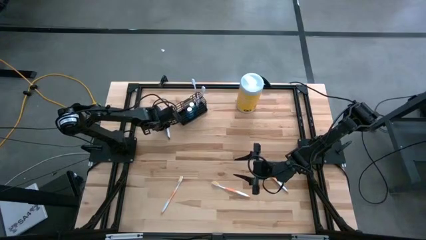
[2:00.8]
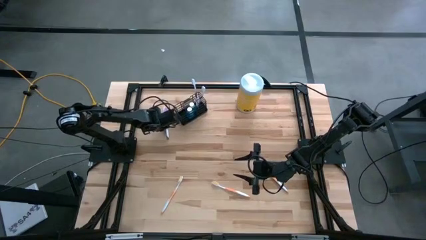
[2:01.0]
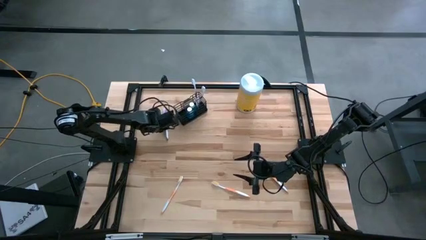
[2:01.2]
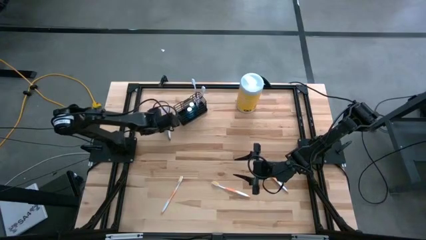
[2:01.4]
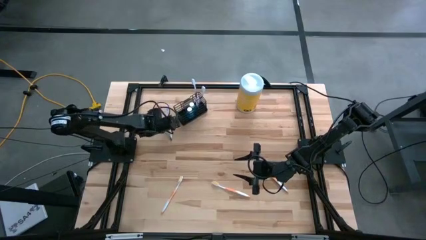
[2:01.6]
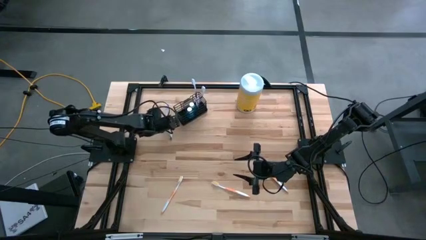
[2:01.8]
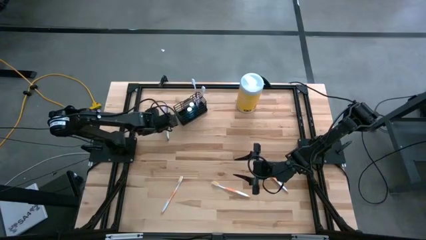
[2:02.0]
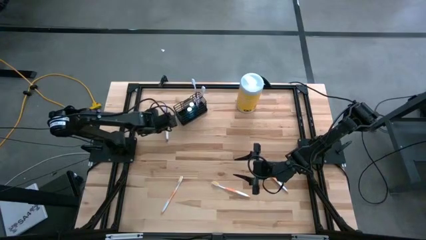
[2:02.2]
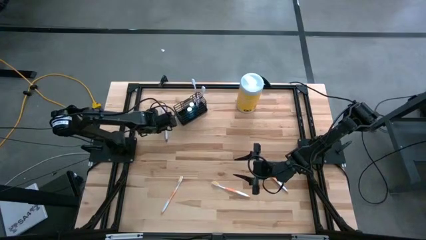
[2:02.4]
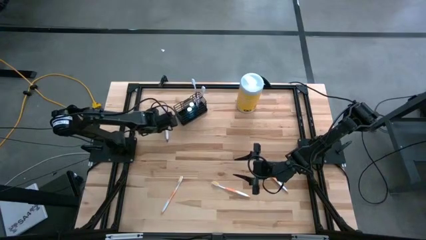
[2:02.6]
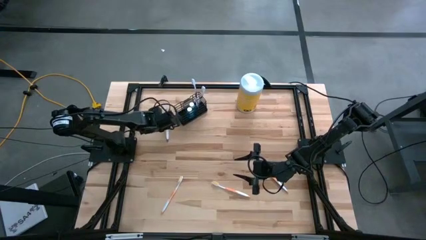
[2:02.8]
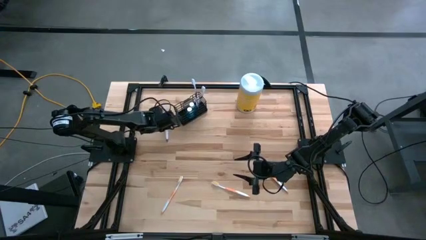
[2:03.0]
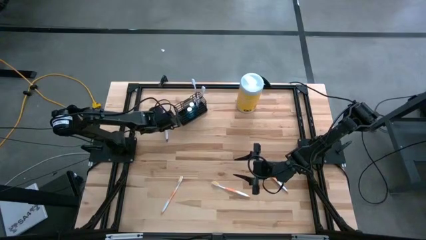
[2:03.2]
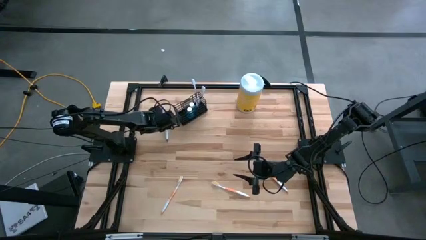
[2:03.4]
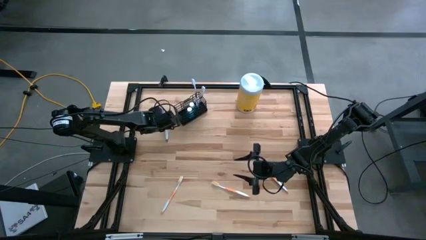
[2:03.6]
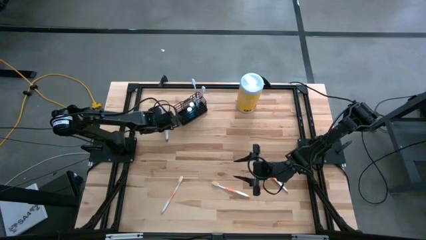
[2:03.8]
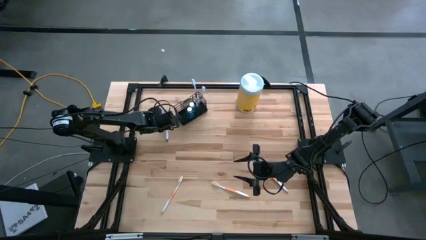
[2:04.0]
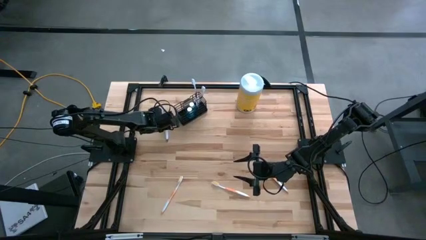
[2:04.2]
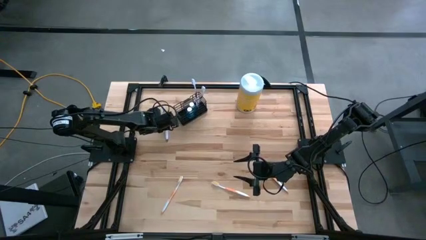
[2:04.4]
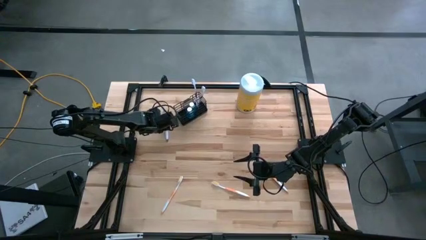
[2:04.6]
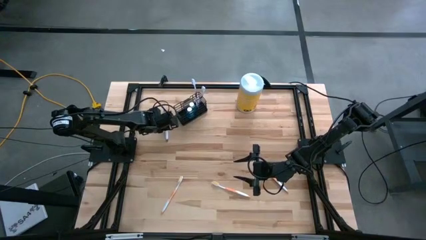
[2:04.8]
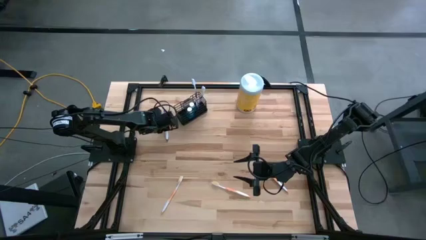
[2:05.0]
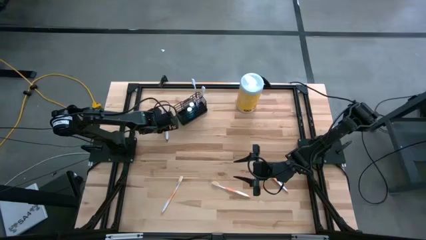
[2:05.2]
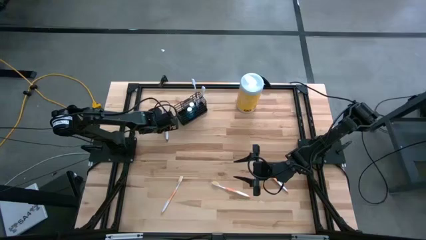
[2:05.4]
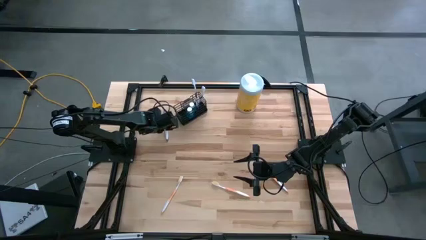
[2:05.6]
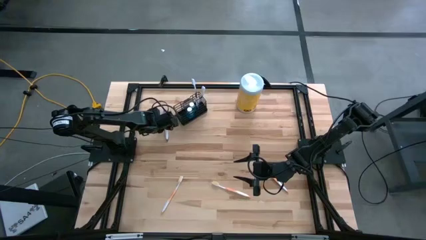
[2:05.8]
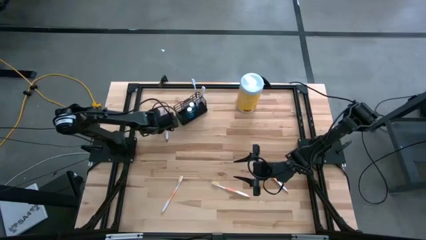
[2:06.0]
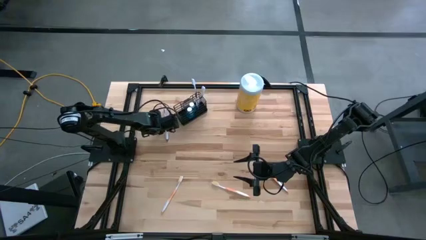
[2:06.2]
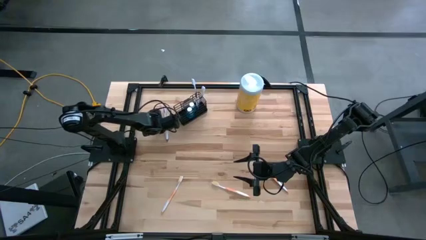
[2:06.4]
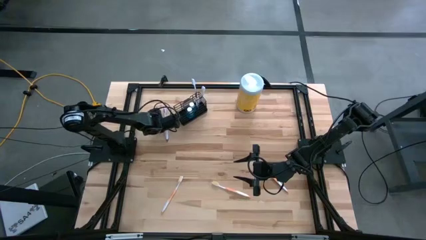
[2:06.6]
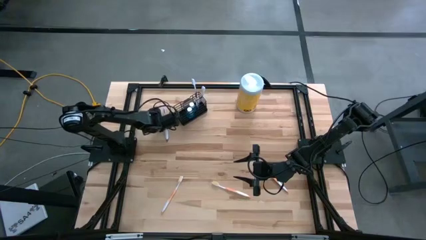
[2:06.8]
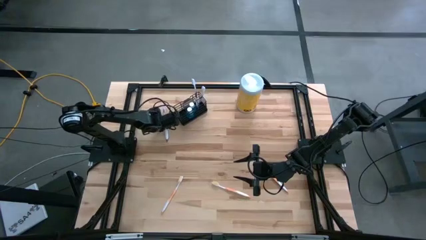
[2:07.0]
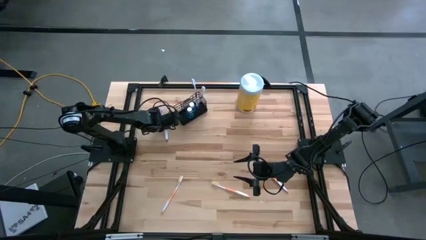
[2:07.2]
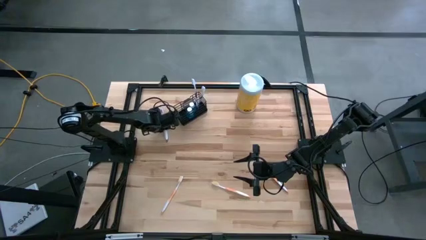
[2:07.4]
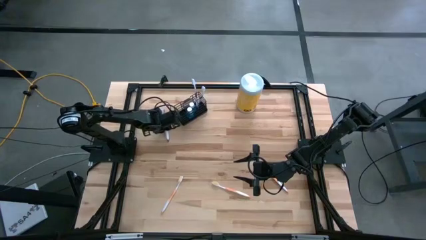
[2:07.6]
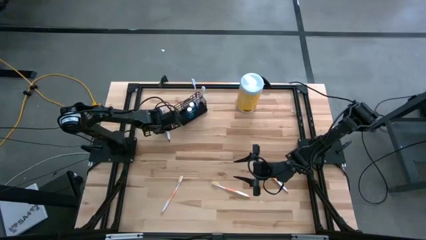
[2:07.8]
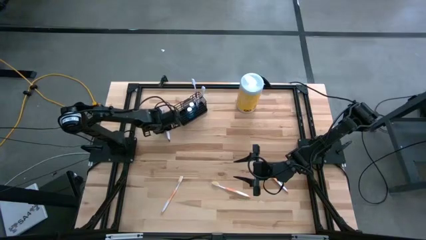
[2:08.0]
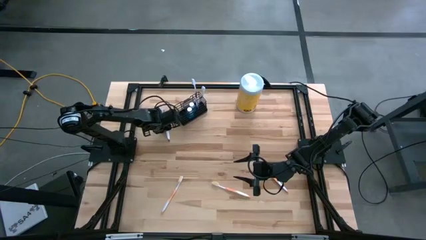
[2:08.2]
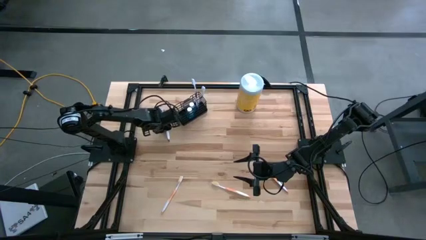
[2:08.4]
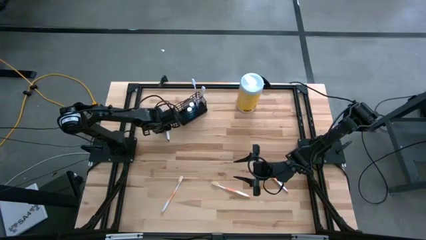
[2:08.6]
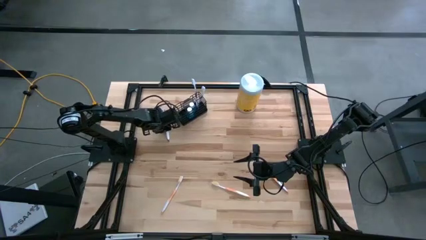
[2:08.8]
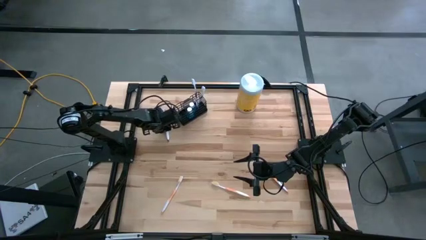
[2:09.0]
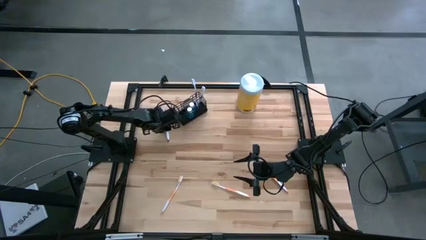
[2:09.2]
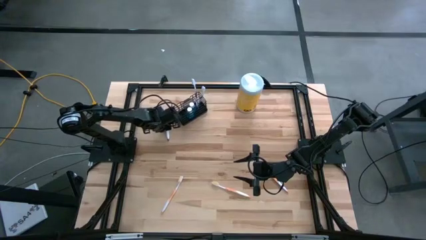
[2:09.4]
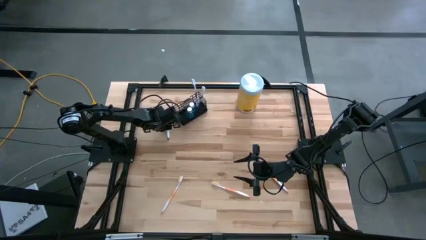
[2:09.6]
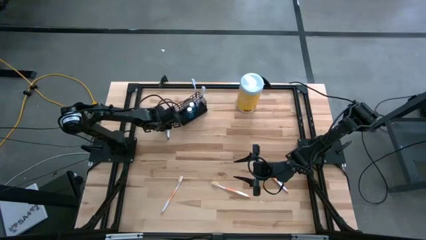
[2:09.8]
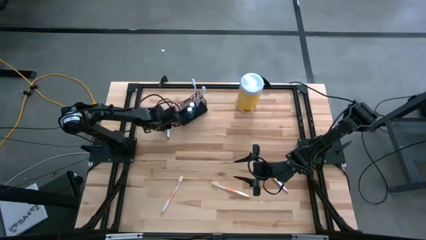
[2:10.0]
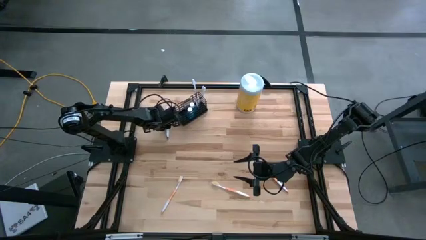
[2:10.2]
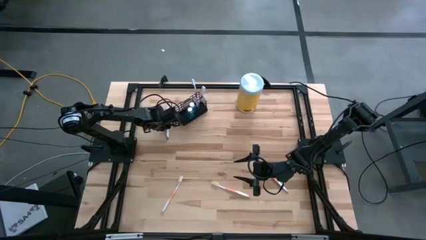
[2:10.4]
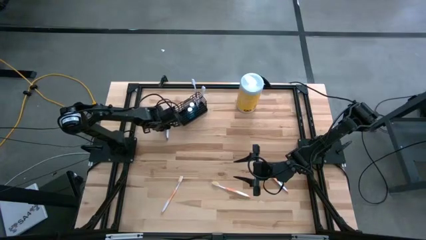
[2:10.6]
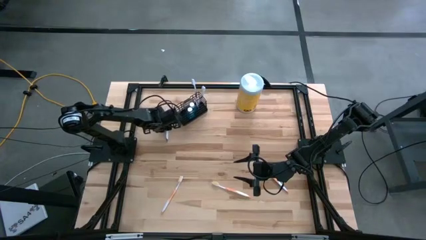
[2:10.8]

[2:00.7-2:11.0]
Task: Pick & Place toothbrushing station
Put the purple toothbrush into the right section of the wire organizer

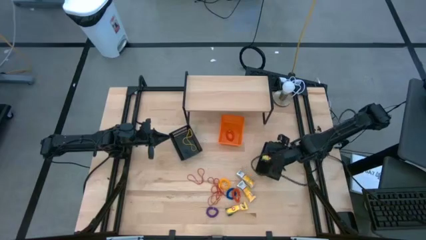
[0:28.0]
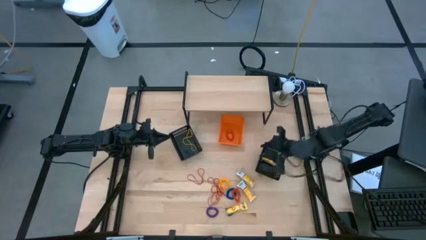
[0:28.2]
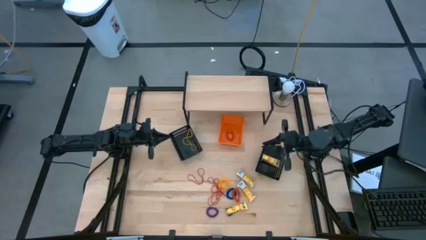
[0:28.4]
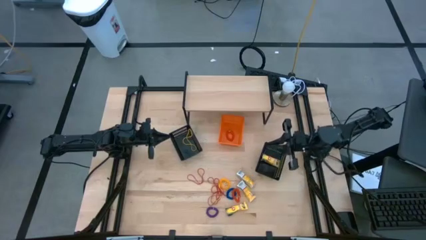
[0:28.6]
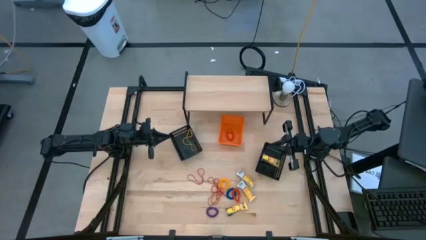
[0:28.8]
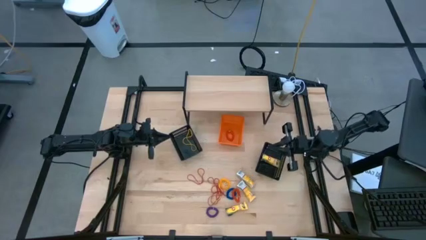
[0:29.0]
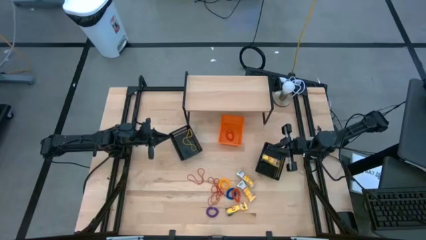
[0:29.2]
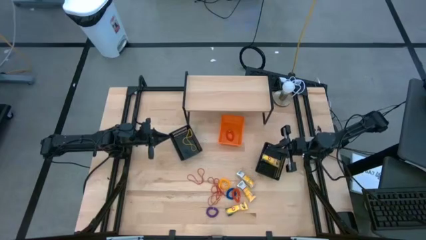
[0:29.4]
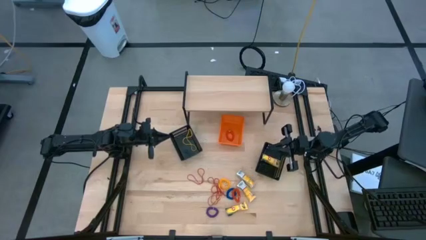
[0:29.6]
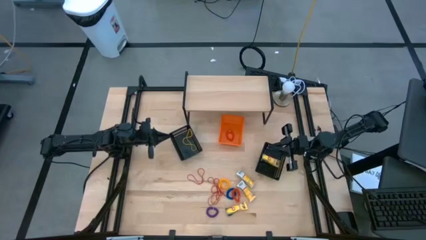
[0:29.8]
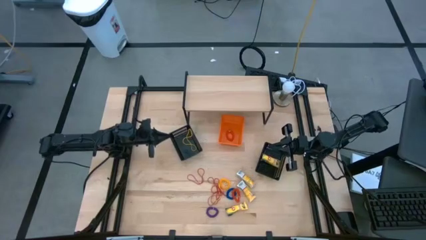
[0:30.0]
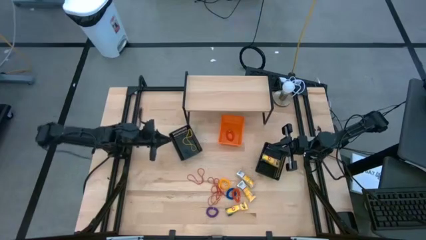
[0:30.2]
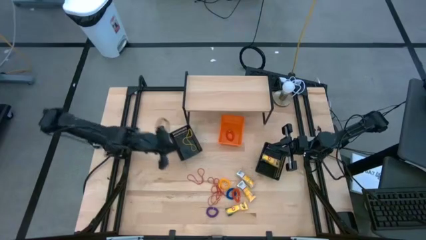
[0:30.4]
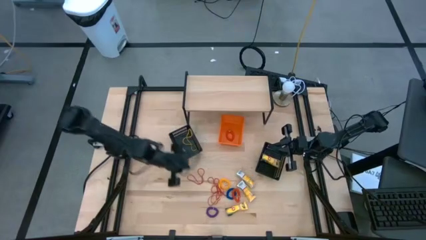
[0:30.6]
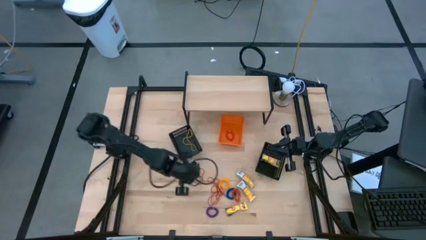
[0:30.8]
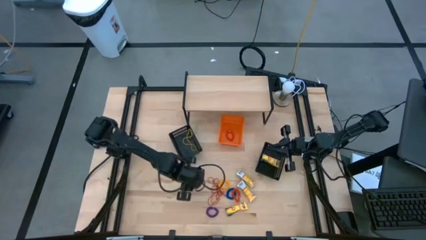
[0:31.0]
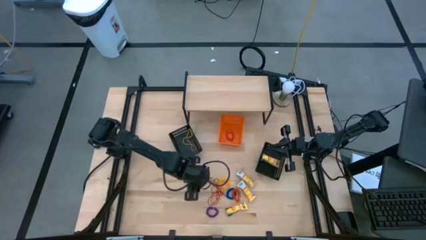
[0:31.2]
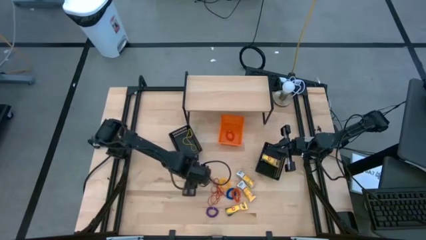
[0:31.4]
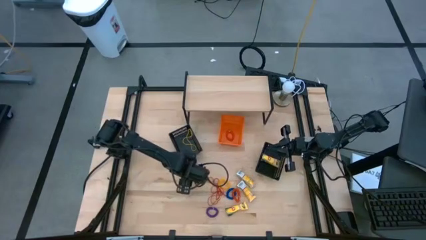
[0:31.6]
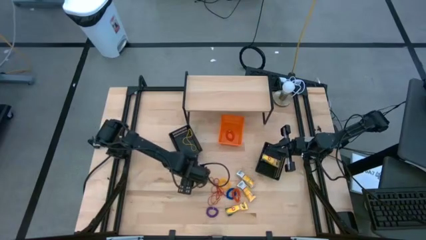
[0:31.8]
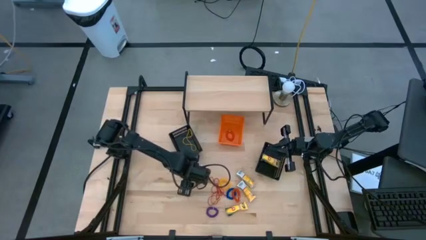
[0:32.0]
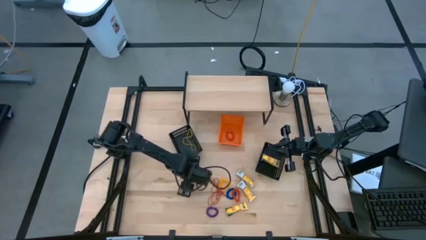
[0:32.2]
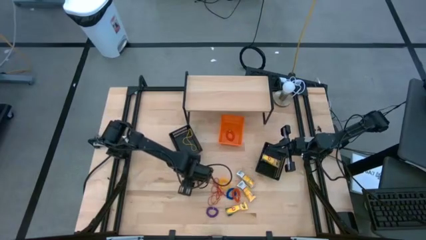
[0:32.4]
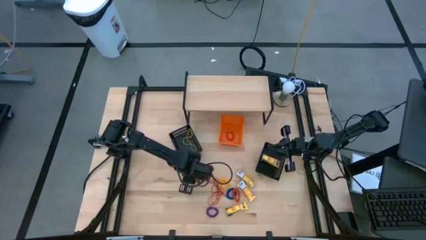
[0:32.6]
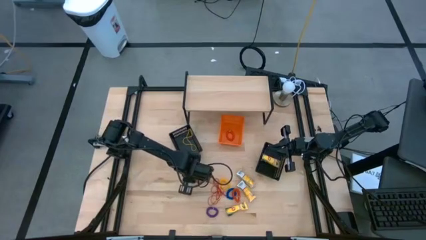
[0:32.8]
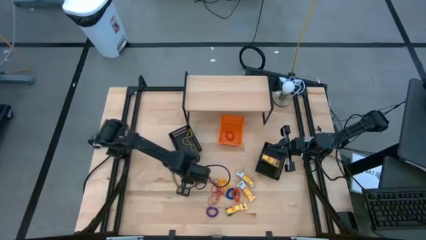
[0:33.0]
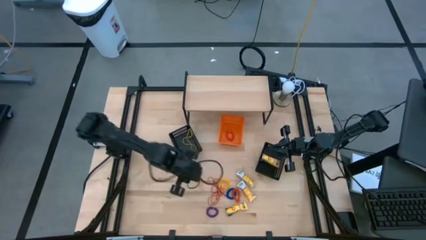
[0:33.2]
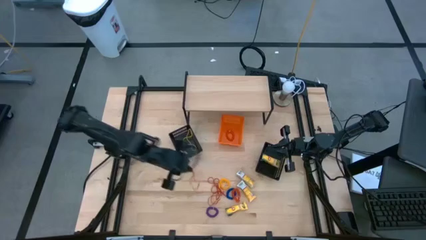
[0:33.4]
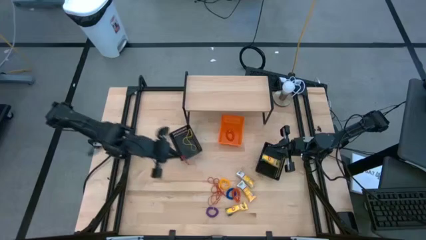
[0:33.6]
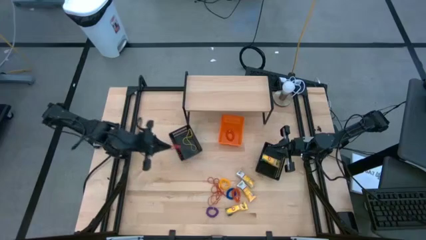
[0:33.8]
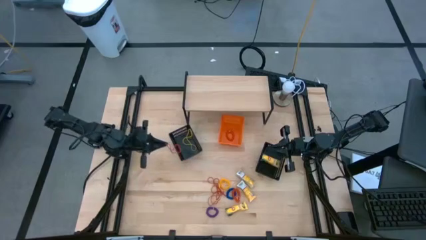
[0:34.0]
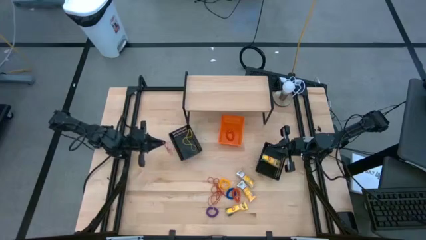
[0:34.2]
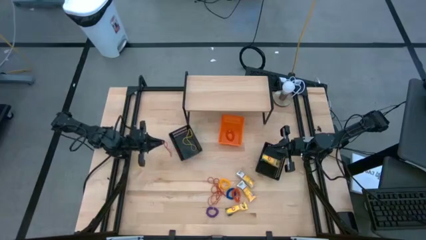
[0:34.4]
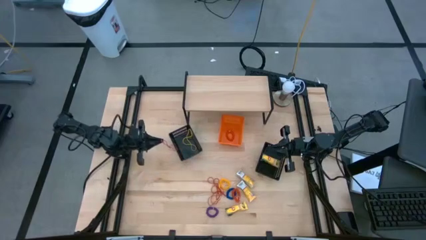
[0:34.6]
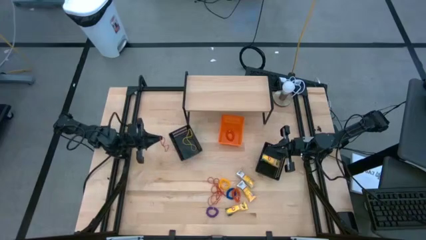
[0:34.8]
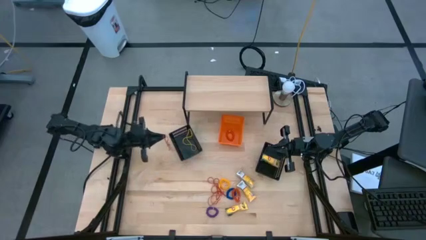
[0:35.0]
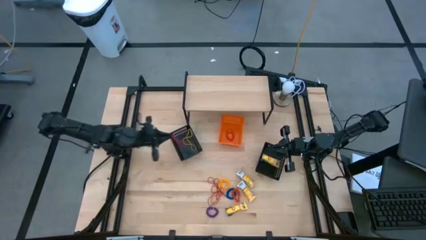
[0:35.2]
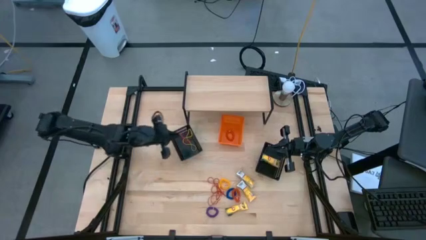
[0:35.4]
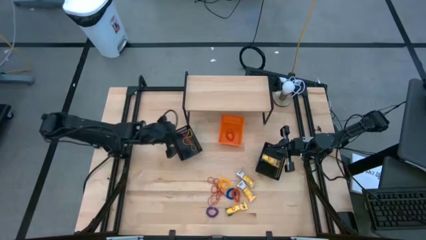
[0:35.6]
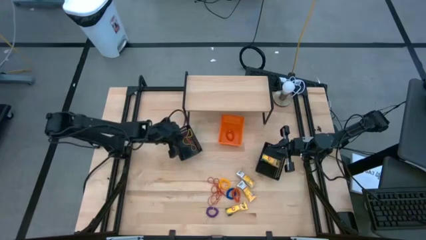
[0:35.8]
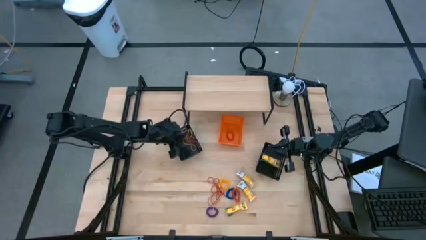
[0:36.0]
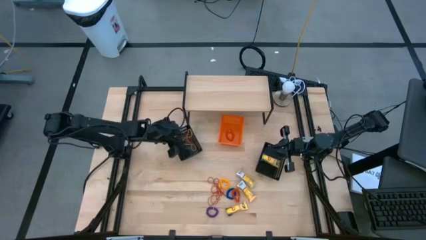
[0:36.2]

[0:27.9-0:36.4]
Task: Pick & Place Office Desk Supplies
Put the red rubberband into the left black bin
